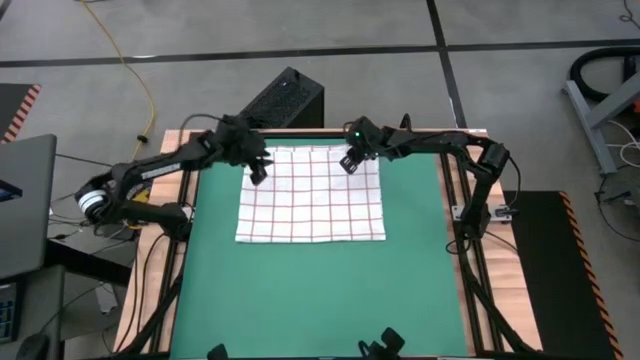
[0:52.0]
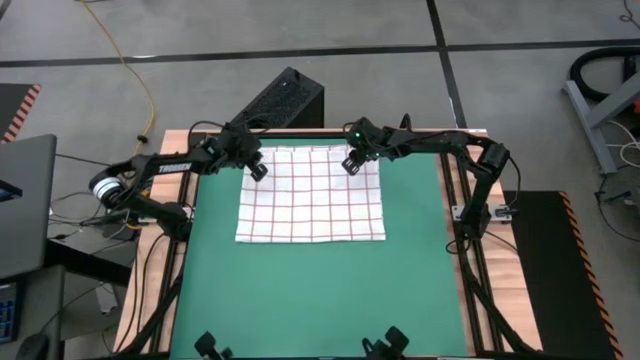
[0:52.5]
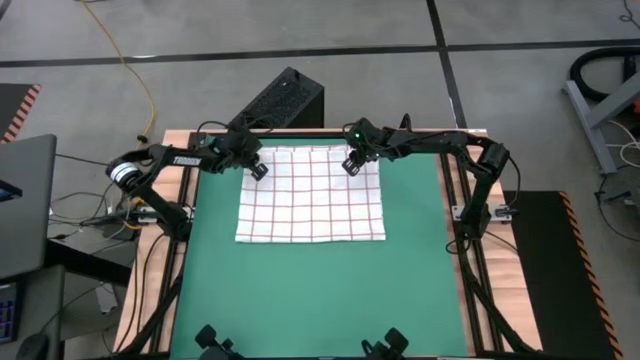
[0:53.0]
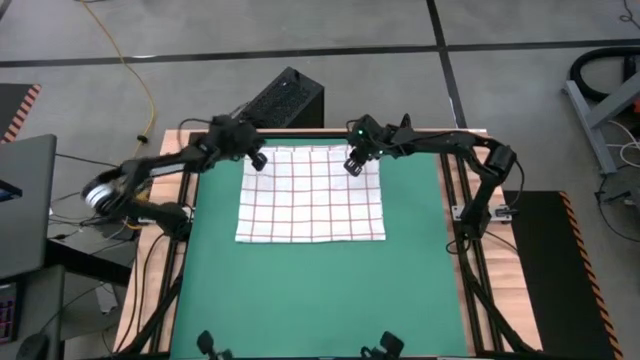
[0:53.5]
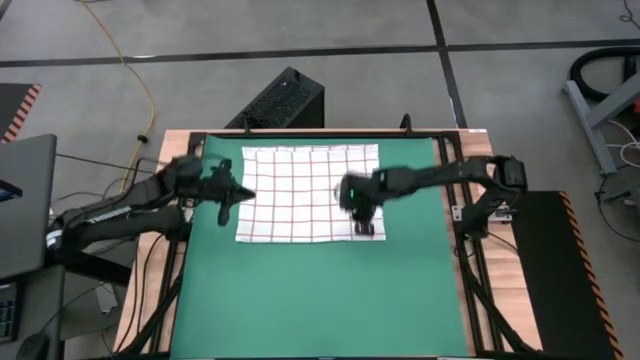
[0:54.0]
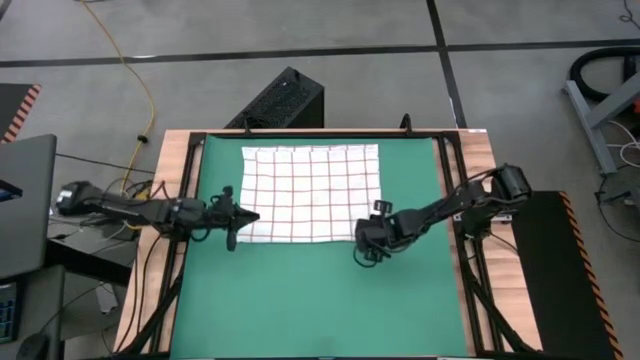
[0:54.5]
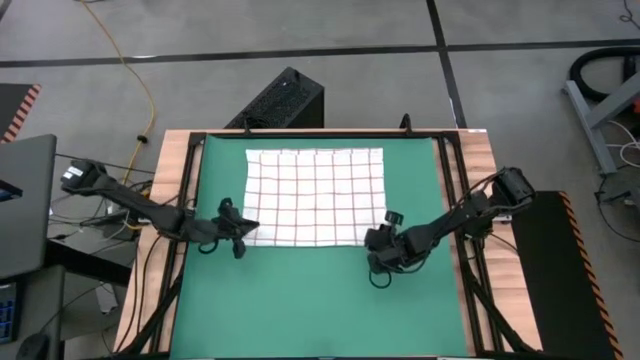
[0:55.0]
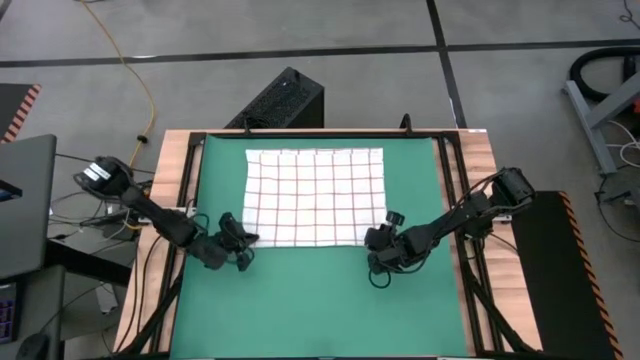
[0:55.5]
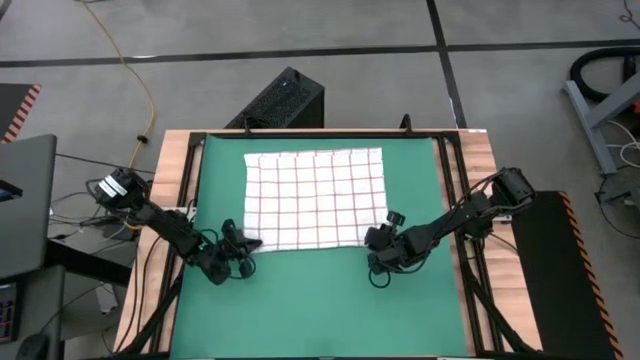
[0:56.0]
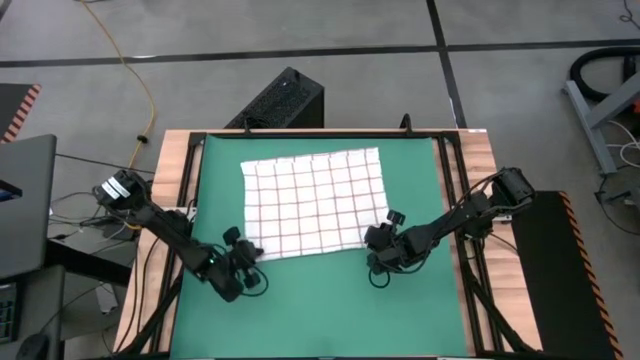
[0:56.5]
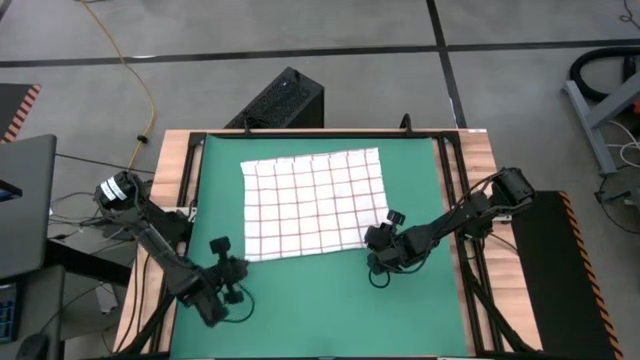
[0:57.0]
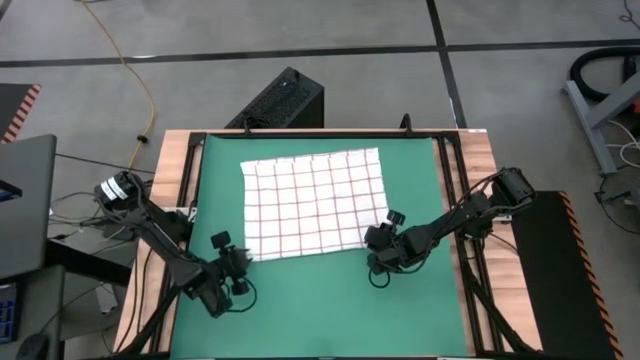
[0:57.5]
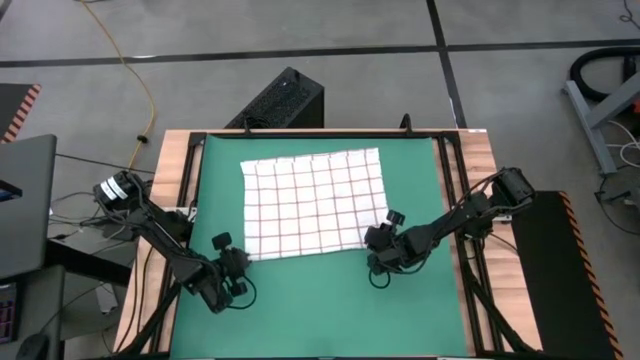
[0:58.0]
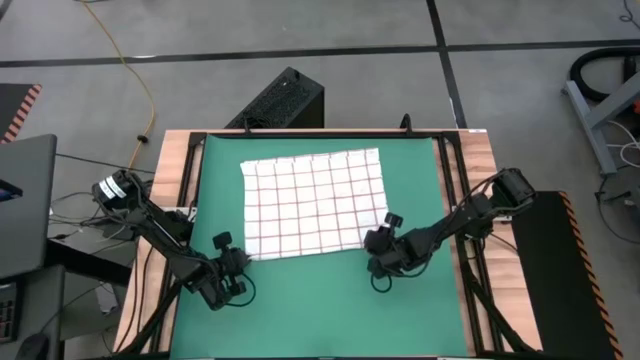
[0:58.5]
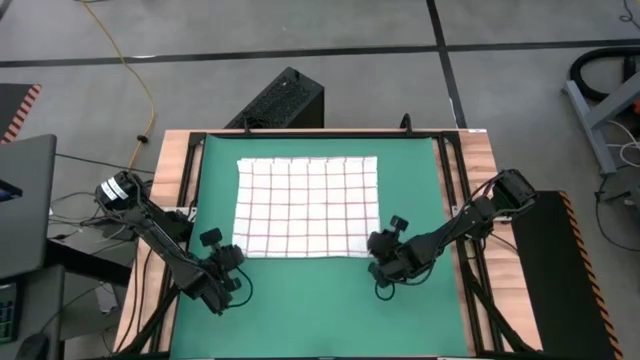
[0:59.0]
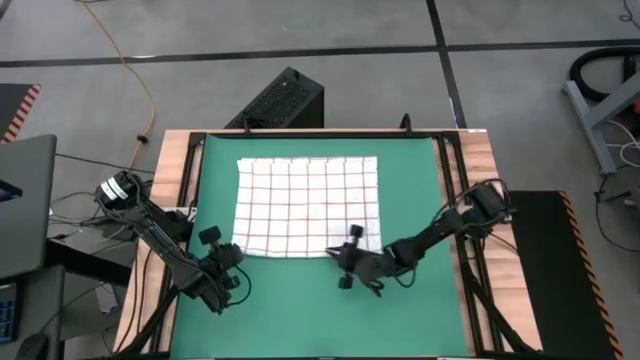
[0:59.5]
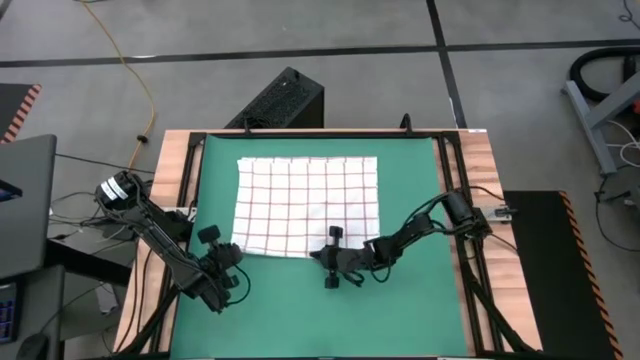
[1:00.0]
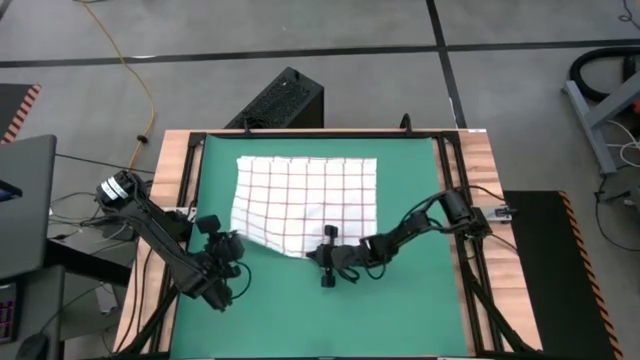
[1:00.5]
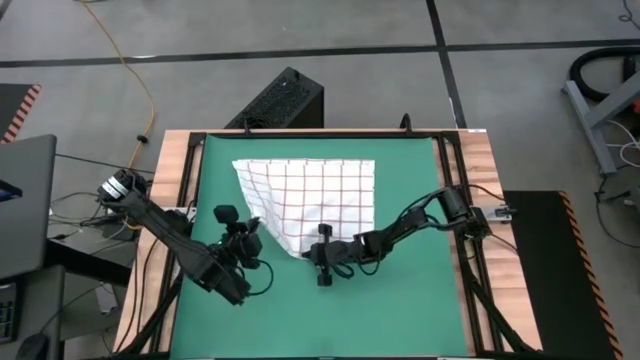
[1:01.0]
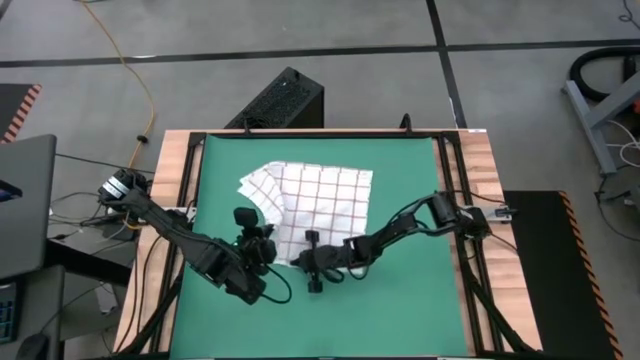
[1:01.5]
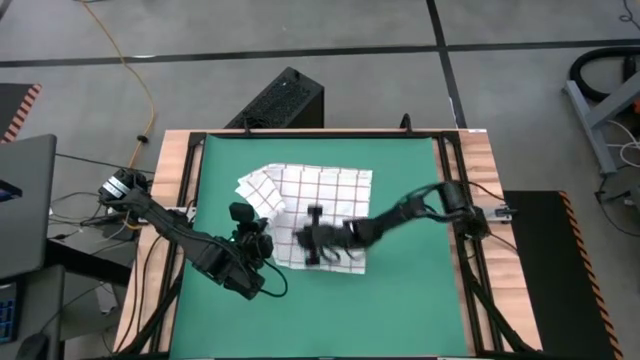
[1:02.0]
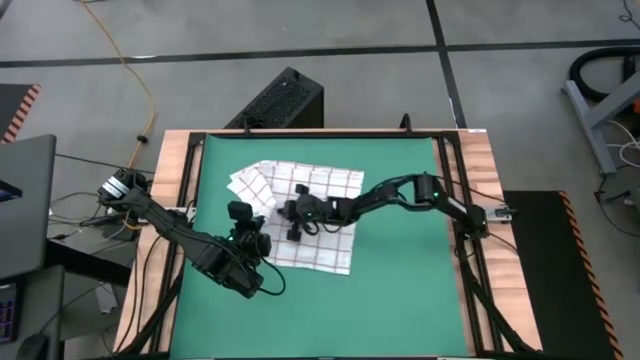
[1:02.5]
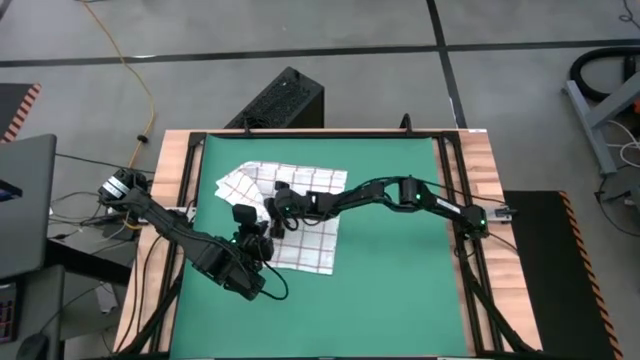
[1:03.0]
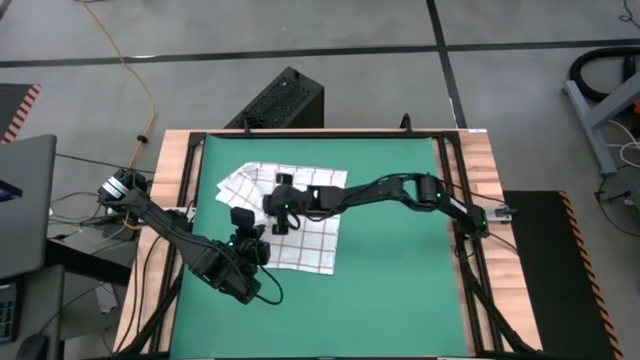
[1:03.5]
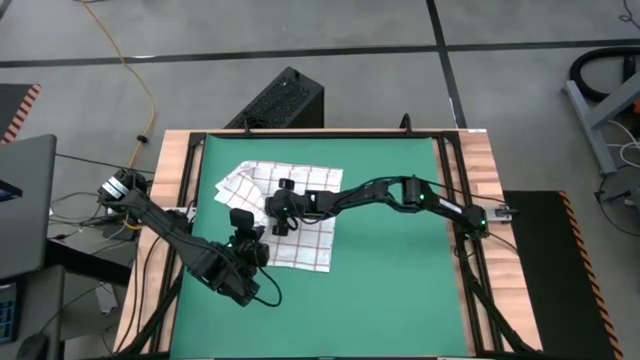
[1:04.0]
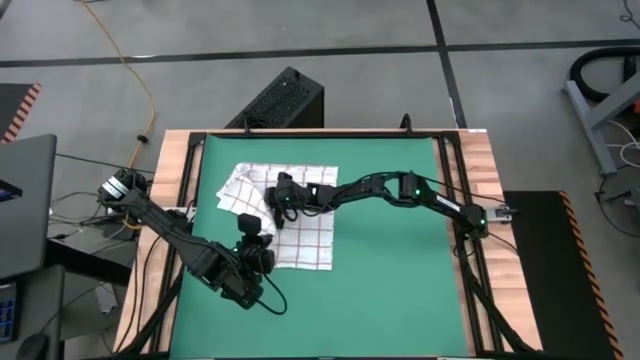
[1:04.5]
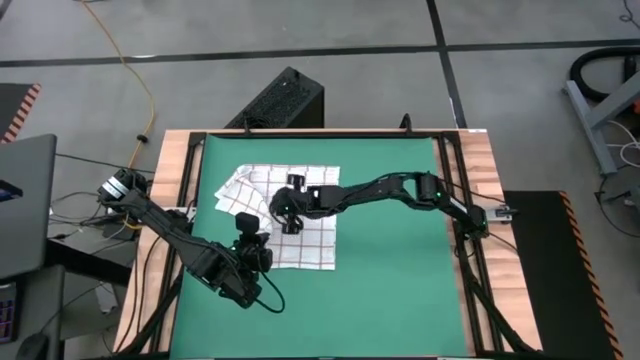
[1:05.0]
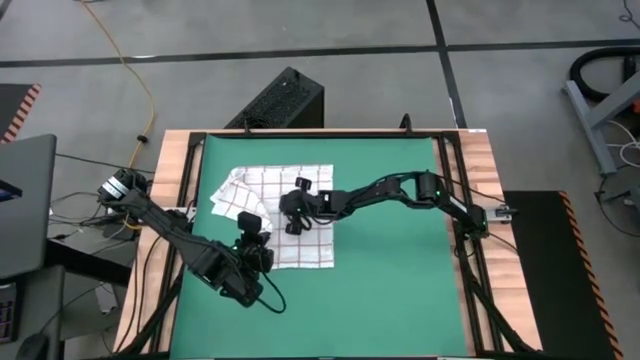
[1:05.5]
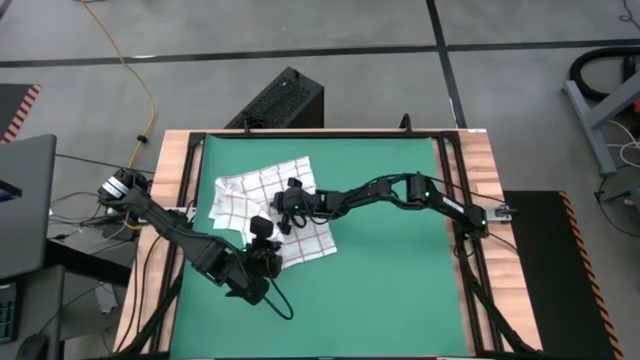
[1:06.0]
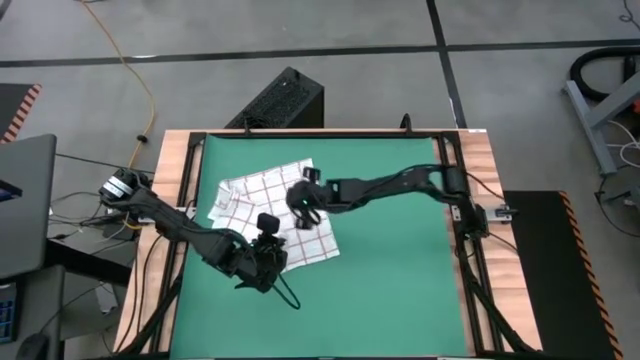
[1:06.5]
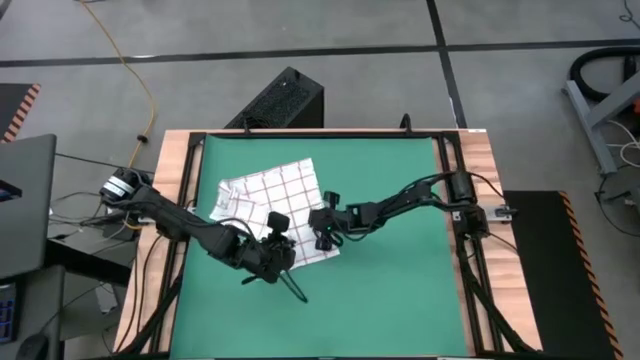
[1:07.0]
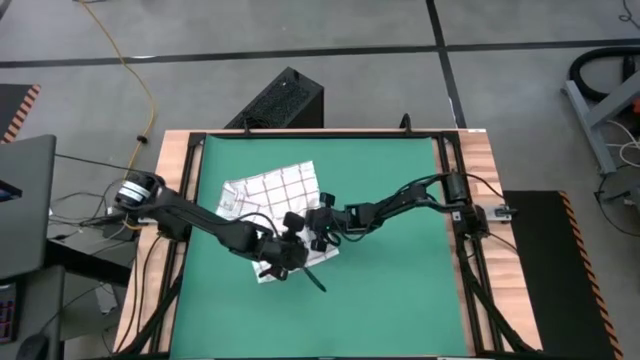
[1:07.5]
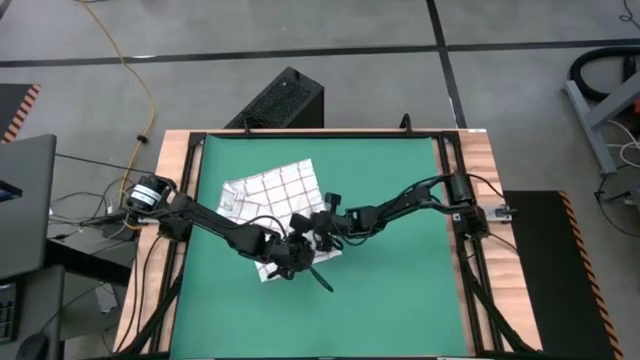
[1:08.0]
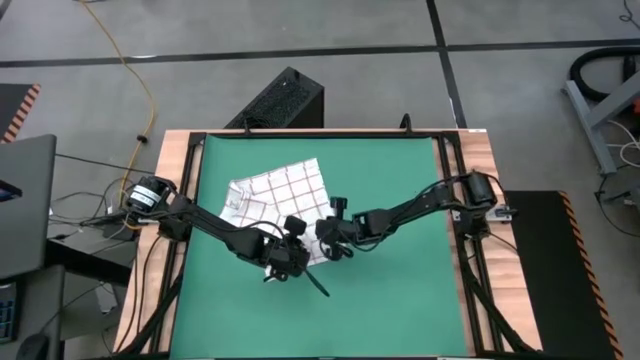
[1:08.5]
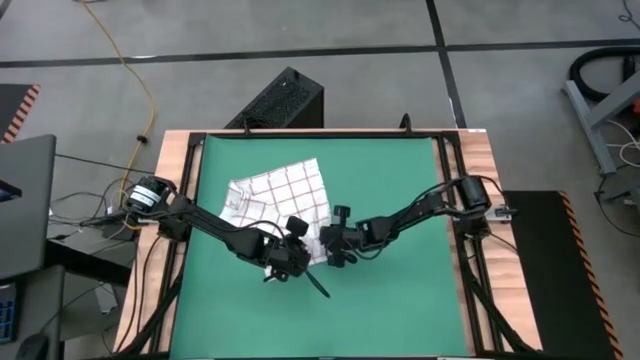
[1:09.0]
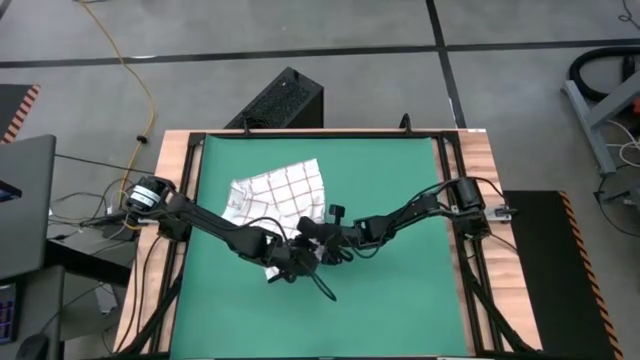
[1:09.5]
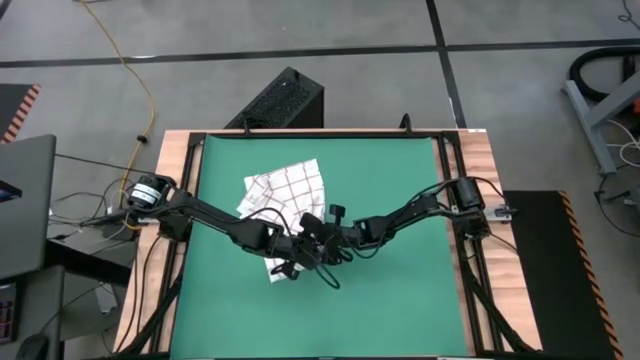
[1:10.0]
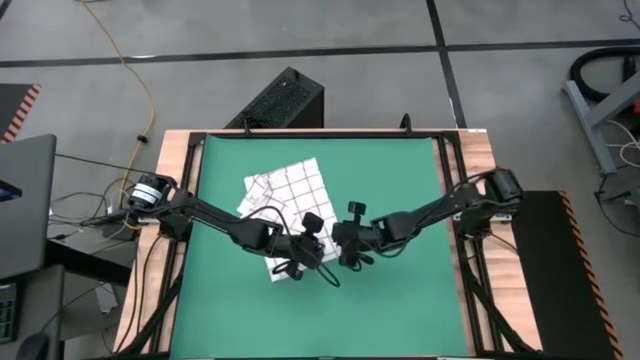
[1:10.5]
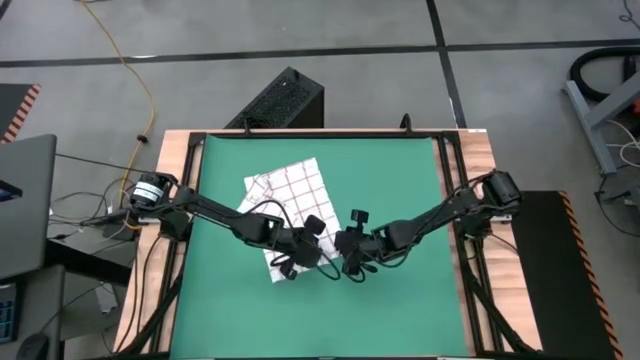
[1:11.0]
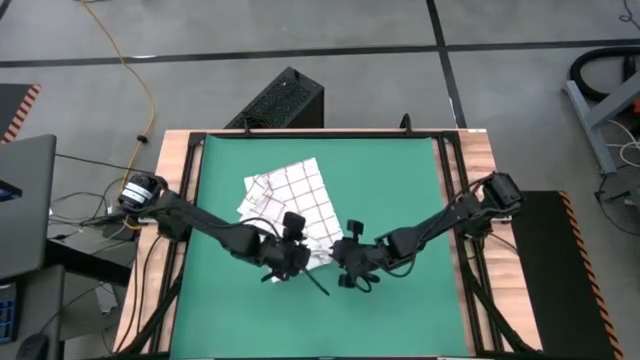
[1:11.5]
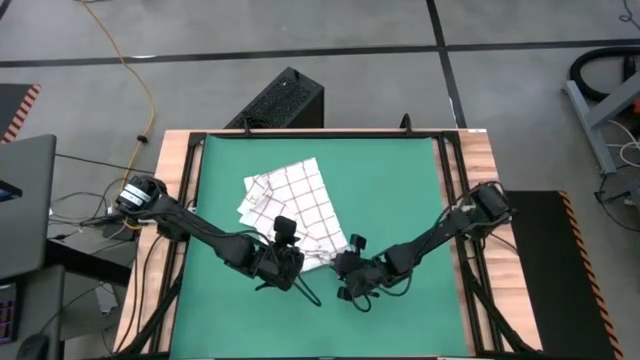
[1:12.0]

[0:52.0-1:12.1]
Task: Roll towel into tight, uniform cylinder
Fold the white towel

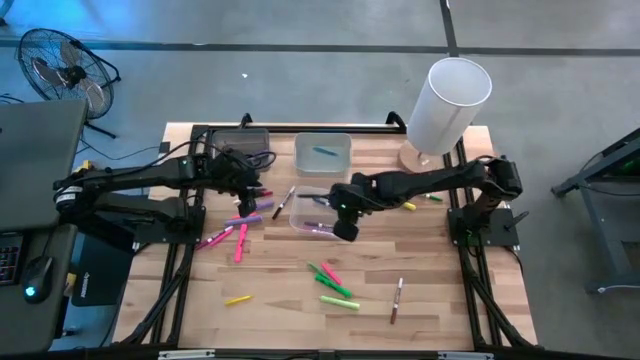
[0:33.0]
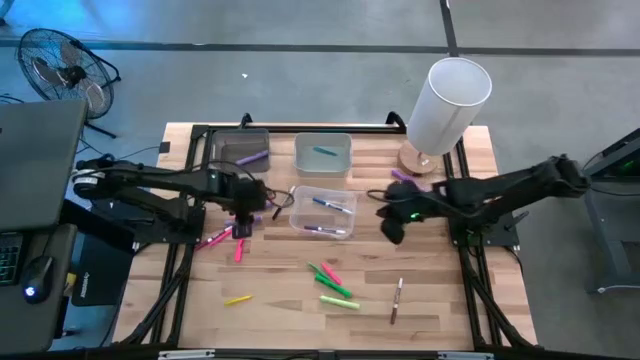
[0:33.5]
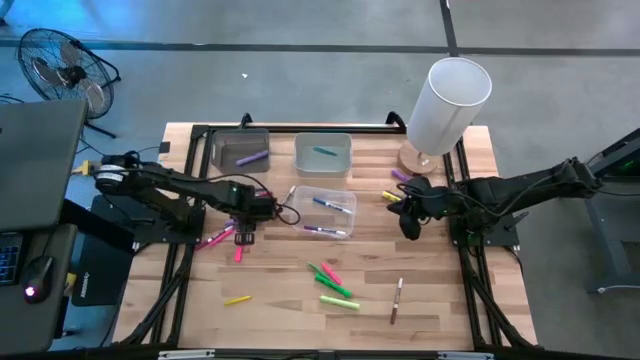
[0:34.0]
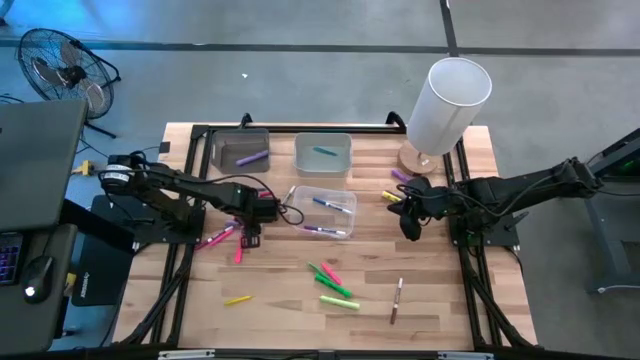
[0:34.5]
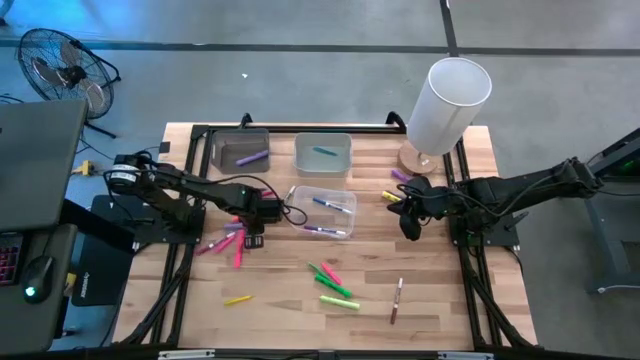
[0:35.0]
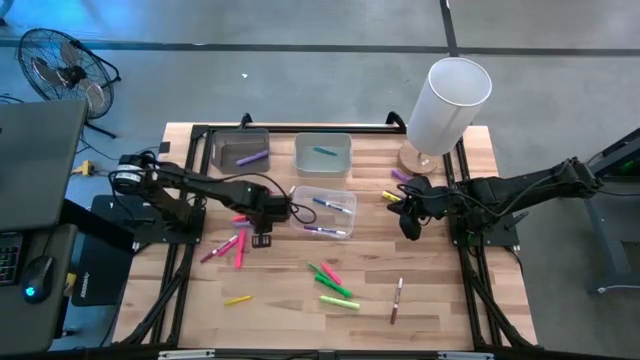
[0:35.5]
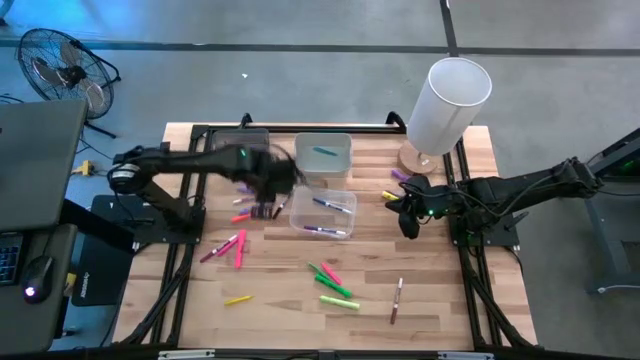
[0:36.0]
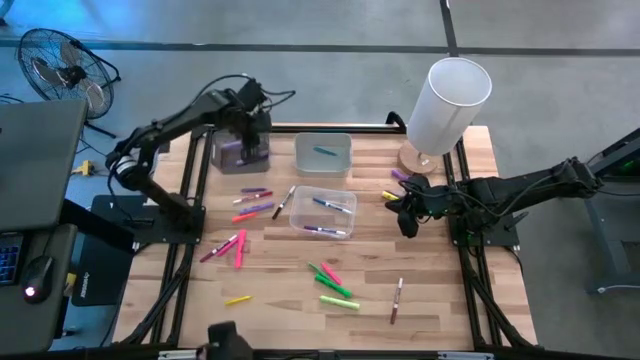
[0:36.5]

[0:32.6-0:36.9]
Task: Pick & Place Markers
Put the bottom left violet highlighter into the black bin
